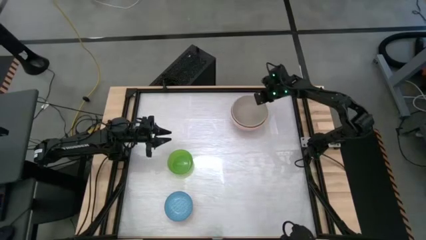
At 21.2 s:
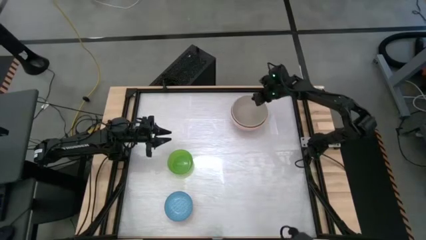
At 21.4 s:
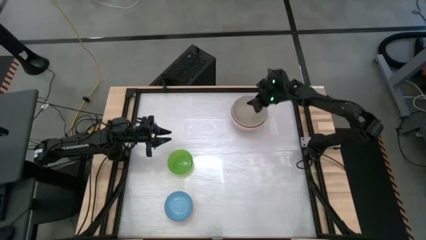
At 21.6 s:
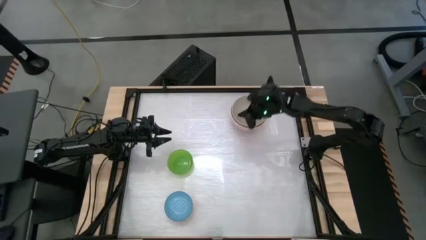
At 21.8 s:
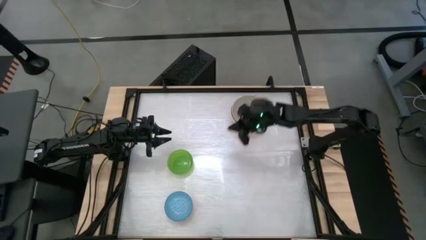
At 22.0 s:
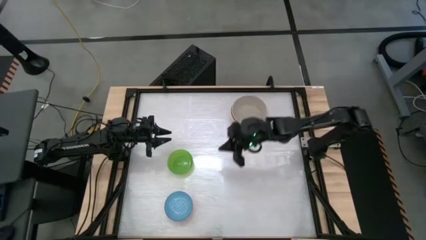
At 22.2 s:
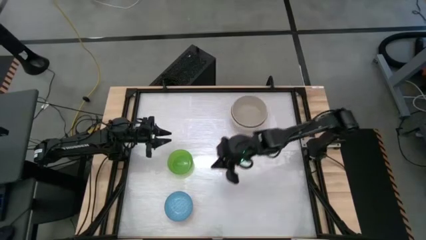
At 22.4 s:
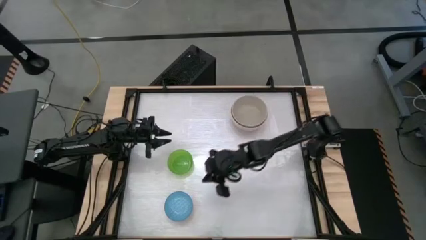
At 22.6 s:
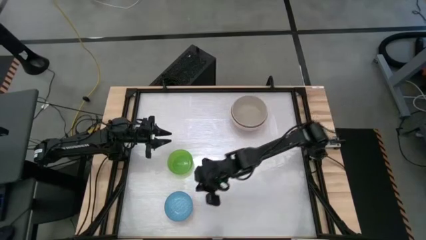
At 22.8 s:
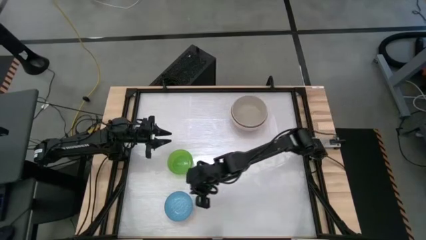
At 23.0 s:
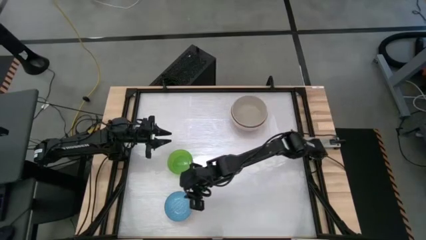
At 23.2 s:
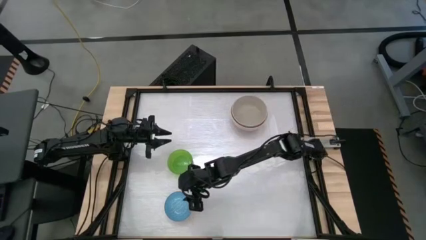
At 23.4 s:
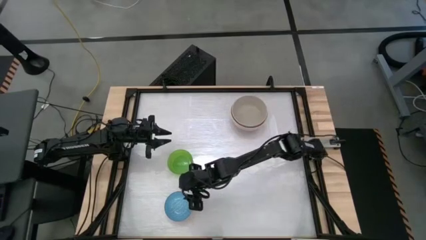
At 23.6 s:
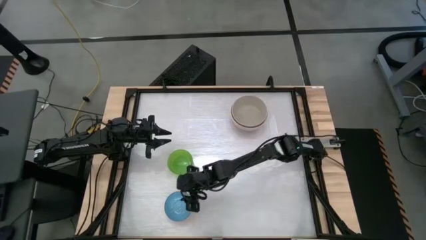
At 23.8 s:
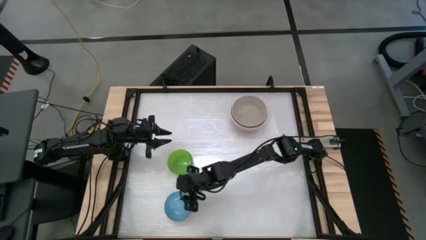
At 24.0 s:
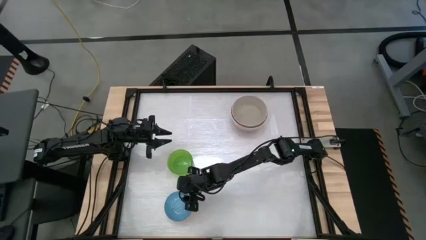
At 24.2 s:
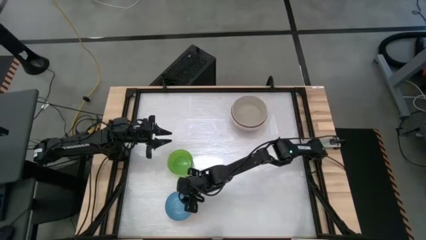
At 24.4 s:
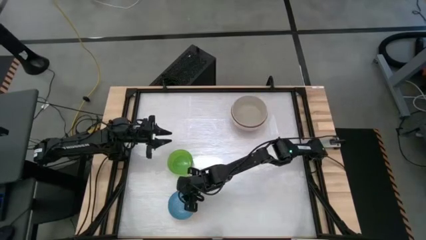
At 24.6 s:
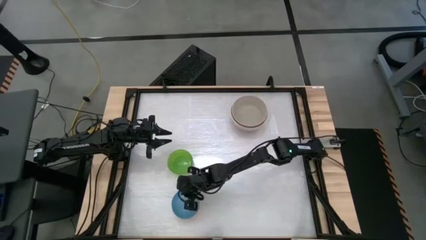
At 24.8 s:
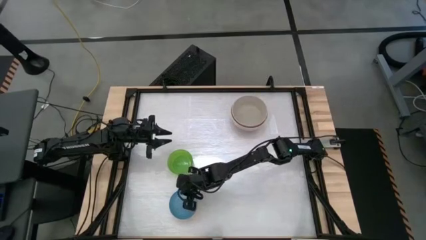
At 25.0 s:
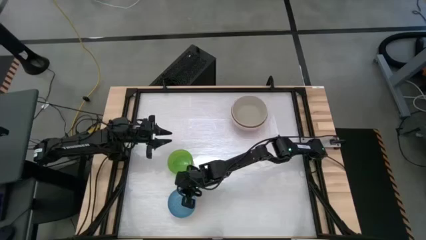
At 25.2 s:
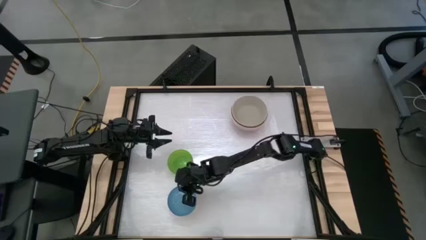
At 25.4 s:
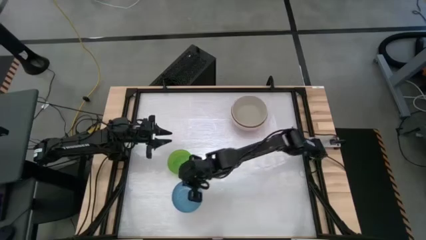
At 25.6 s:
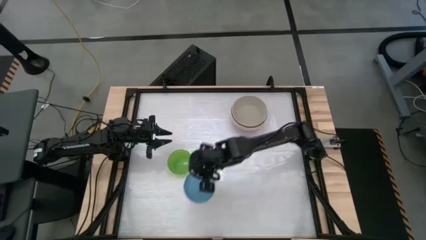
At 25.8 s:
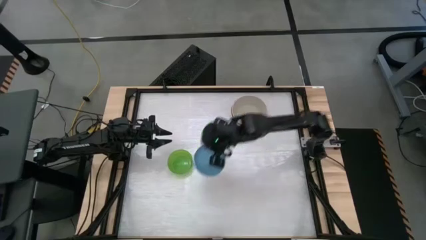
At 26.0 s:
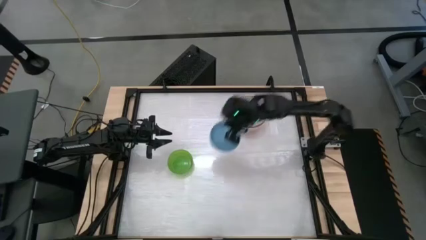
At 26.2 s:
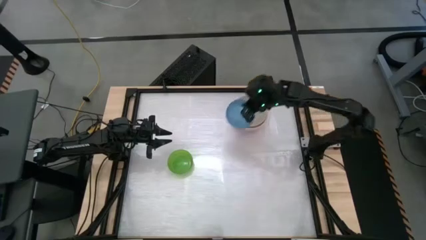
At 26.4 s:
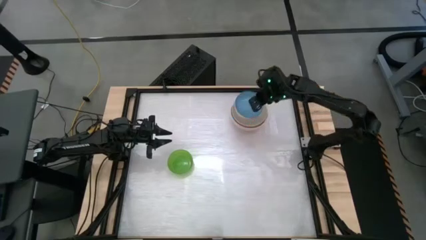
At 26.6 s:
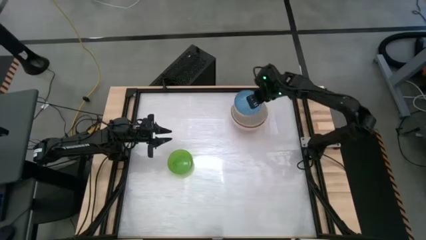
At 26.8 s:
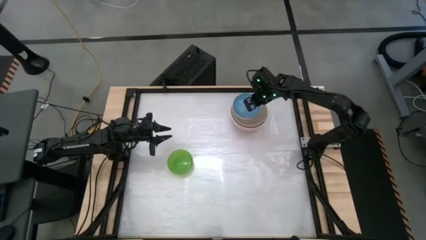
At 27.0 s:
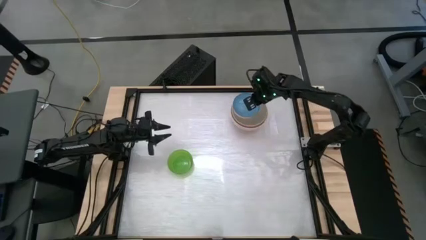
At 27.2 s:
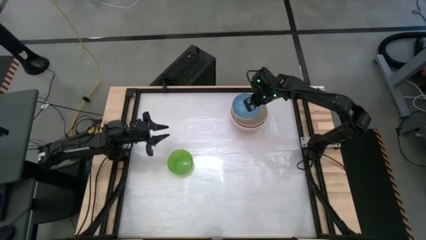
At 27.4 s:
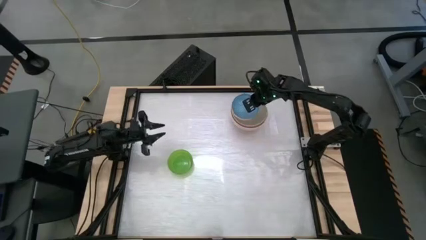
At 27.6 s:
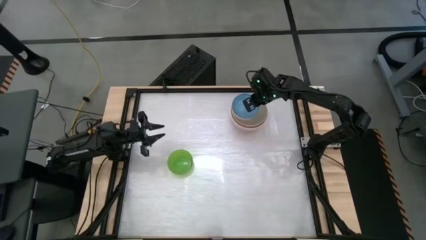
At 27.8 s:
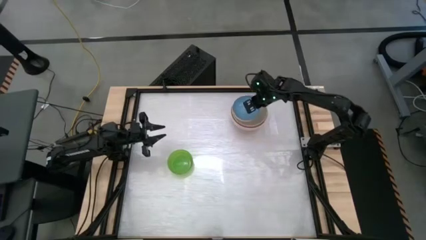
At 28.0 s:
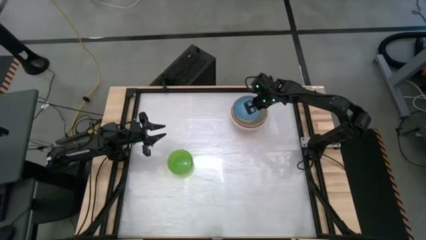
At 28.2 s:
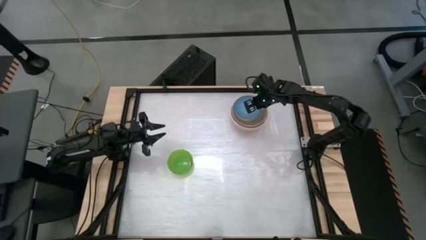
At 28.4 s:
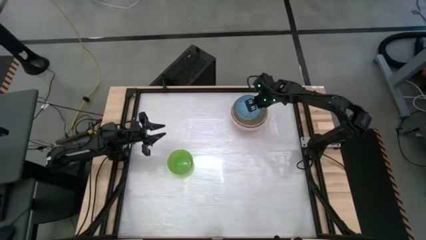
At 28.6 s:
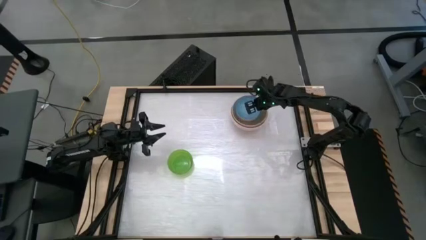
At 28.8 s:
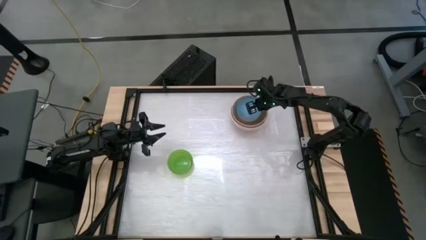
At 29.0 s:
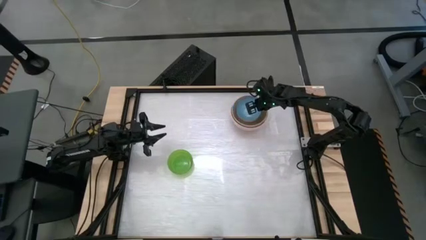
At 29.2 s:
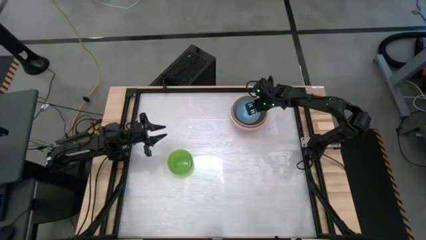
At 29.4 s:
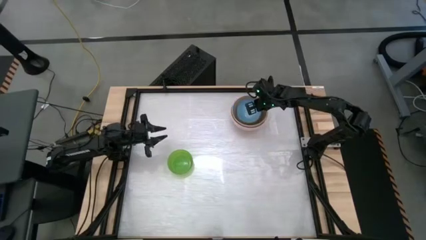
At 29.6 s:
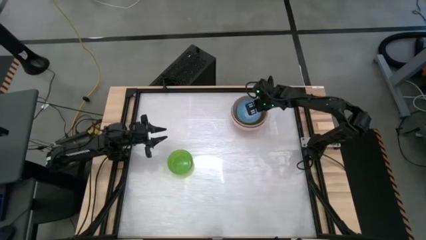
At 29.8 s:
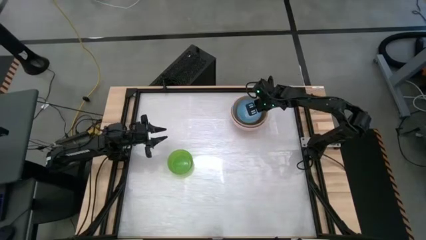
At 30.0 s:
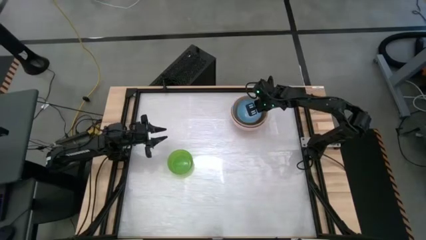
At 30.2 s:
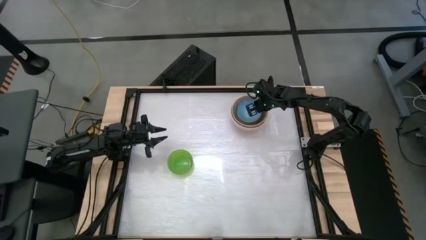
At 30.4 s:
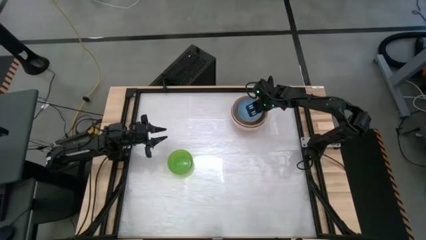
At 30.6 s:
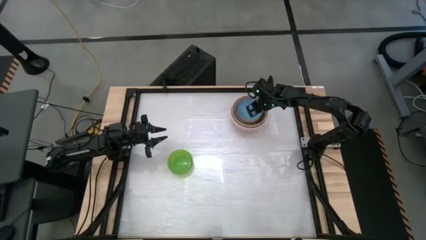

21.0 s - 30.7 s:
Stack the blue bowl on the gray bowl

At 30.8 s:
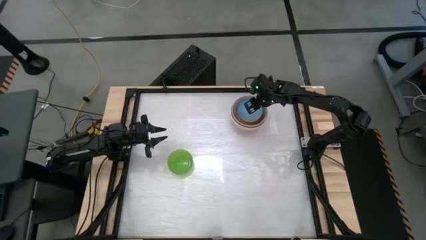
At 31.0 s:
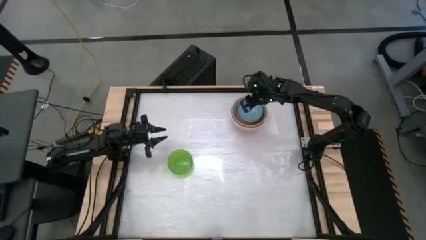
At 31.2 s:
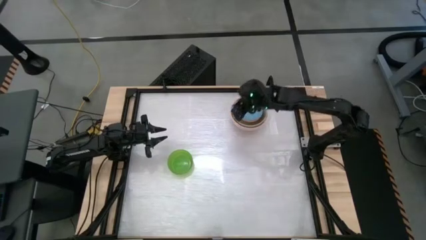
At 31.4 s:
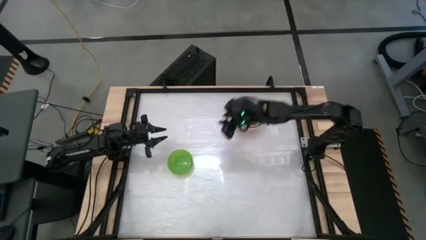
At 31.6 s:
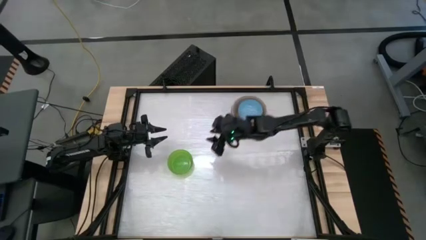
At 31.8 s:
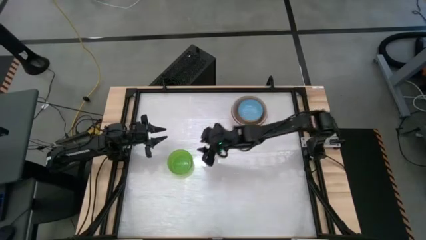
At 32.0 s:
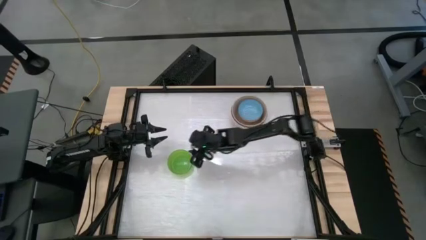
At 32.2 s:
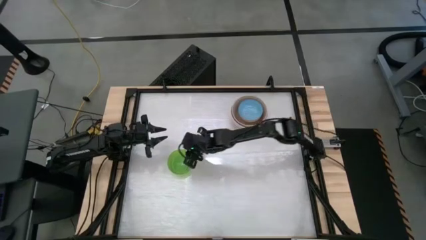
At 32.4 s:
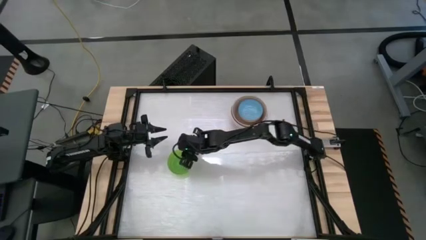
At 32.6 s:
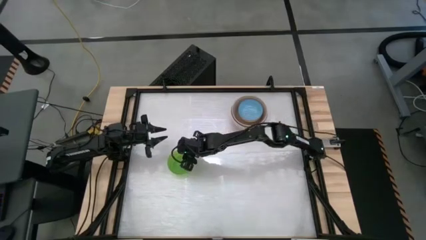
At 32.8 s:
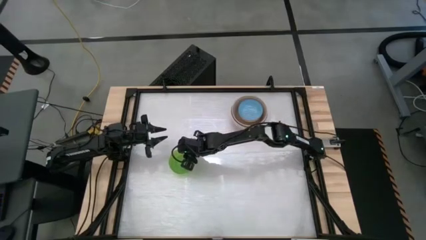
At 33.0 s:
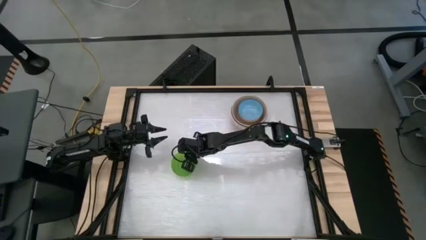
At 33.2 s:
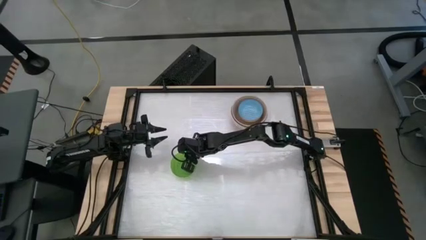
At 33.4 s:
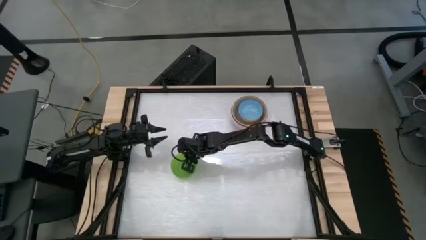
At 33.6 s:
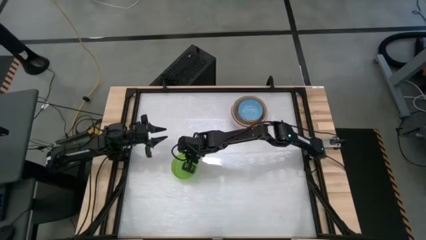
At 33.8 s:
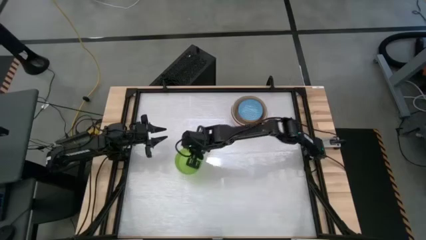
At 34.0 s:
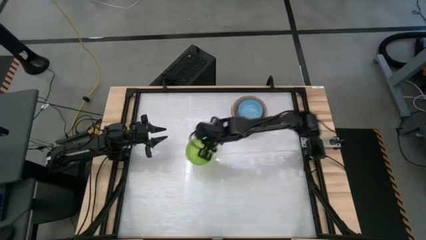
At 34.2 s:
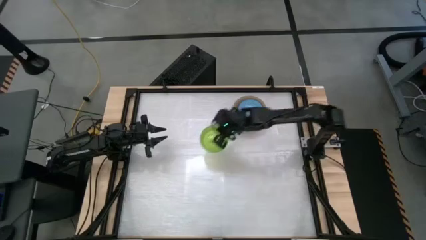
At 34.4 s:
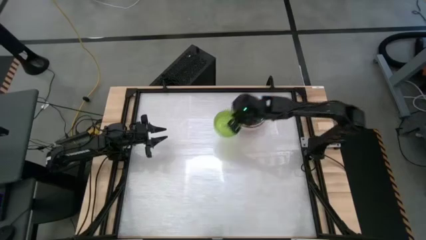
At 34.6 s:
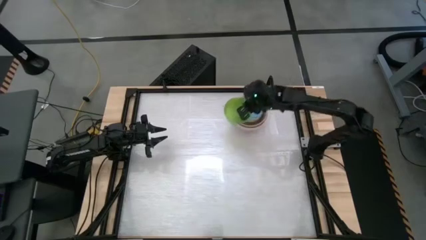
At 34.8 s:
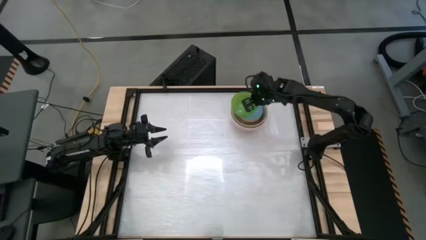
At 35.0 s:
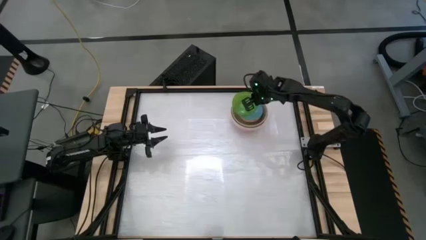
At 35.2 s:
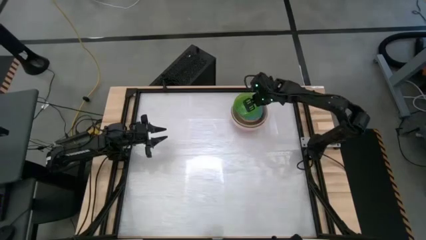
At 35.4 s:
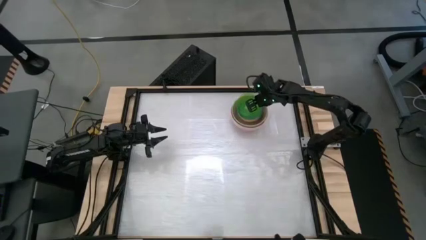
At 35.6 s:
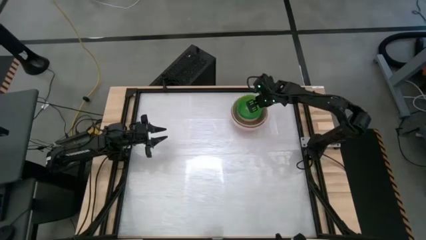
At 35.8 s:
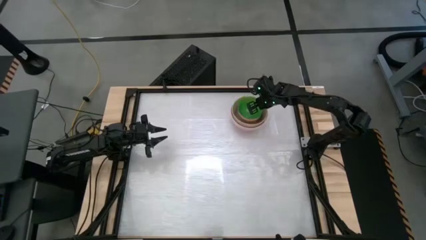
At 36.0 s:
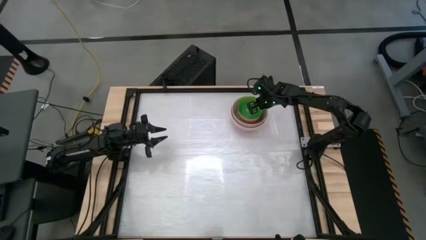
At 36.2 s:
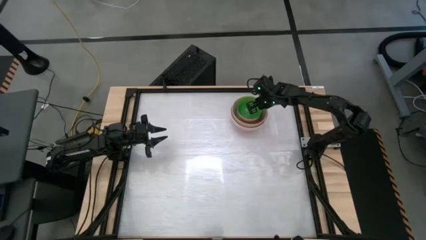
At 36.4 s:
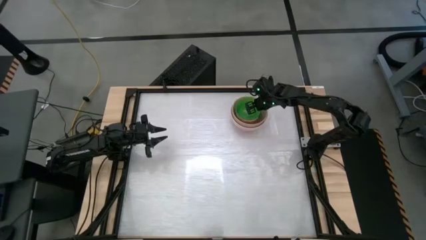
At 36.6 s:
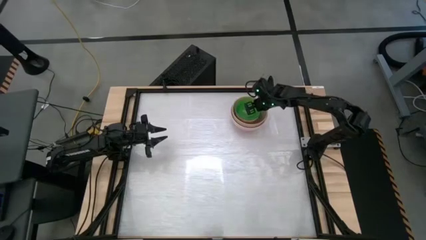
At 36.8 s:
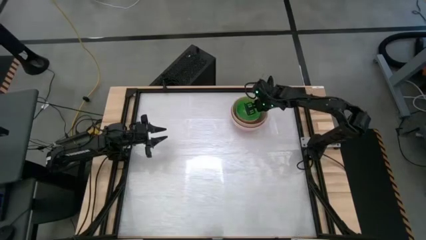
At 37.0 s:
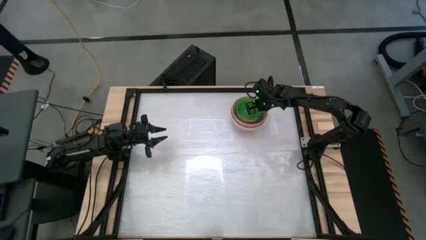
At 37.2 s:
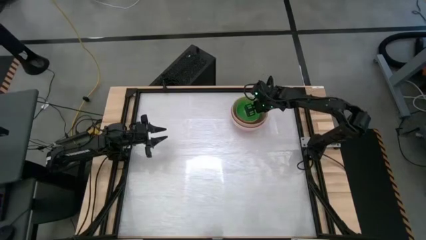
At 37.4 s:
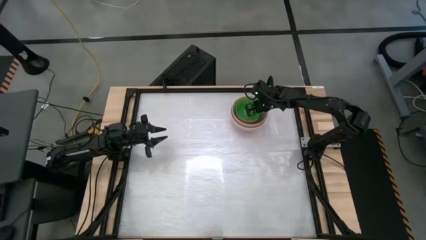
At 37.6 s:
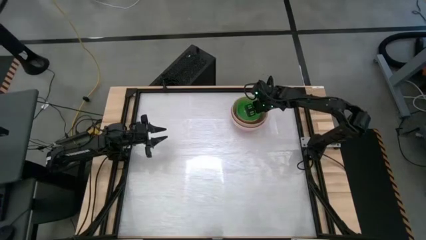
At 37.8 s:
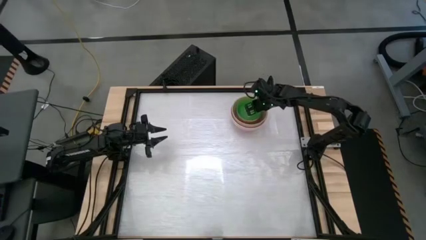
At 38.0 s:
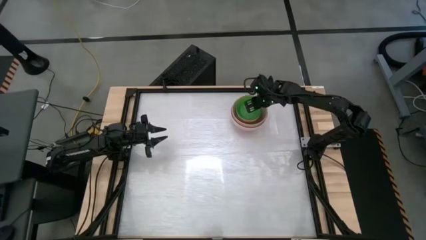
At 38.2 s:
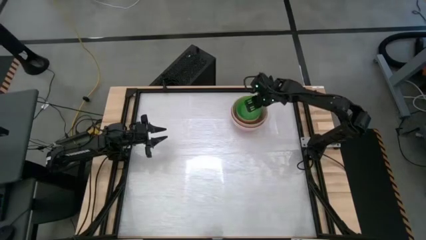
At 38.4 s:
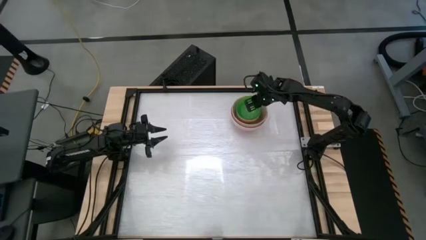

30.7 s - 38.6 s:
Stack the green bowl on the blue bowl
